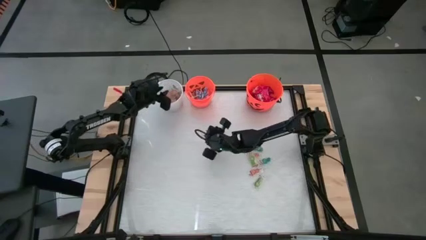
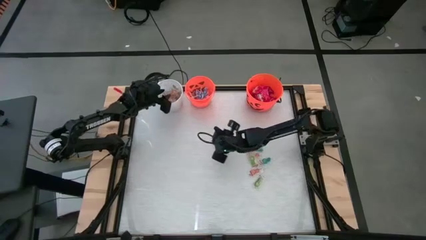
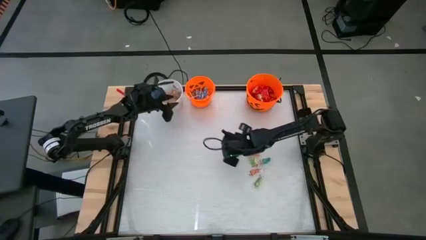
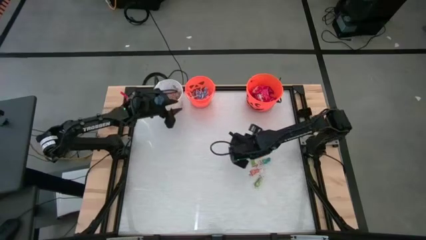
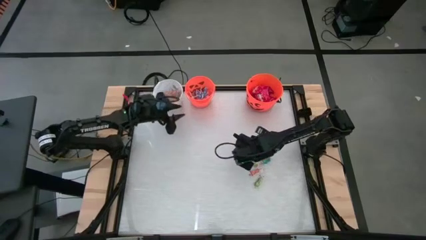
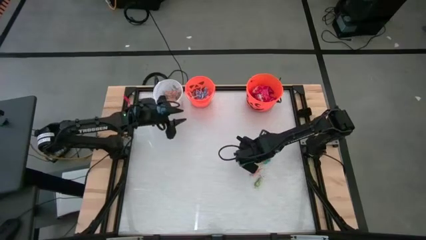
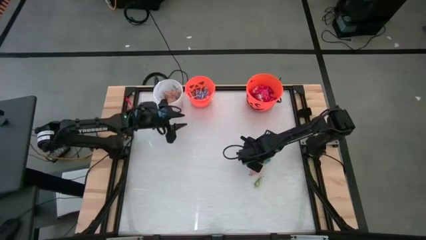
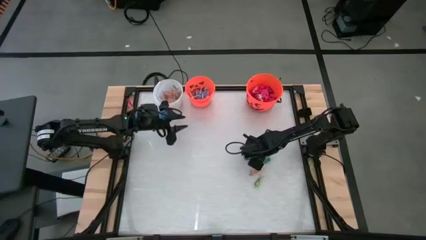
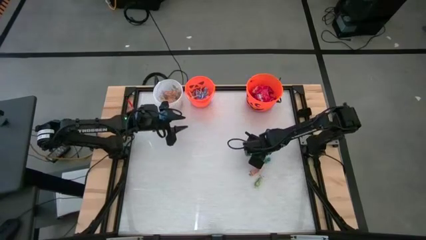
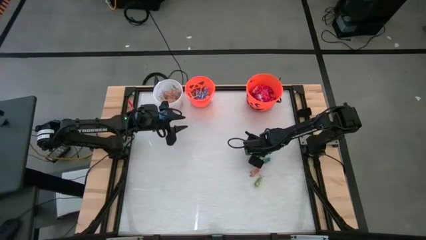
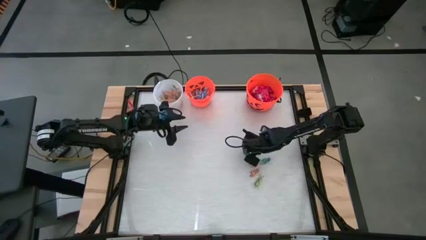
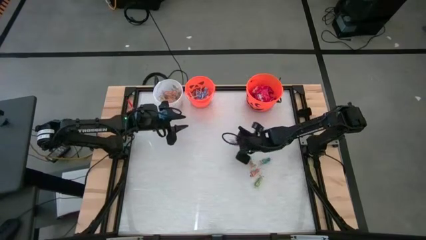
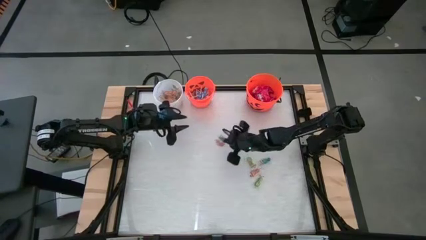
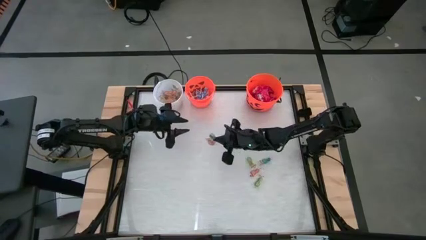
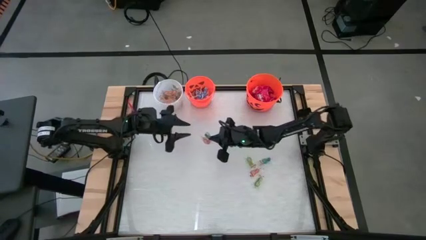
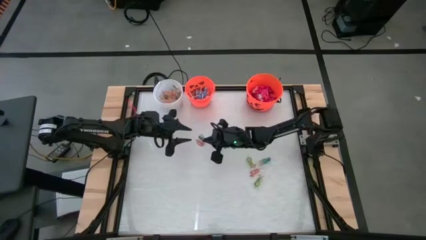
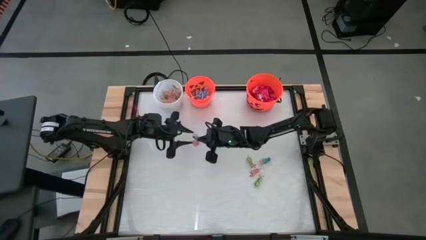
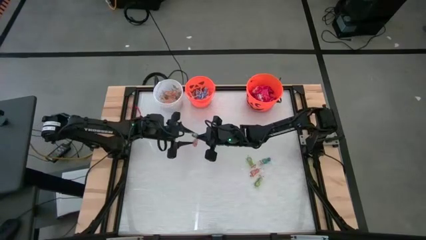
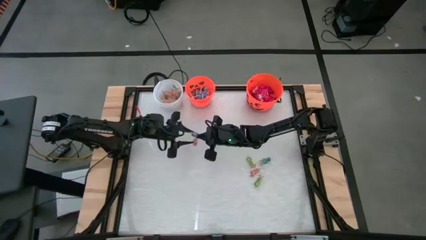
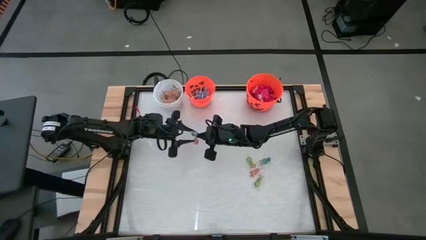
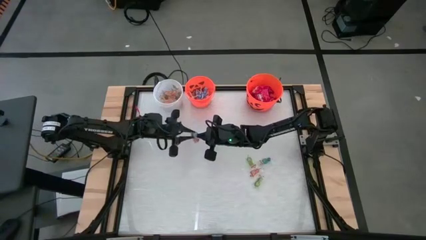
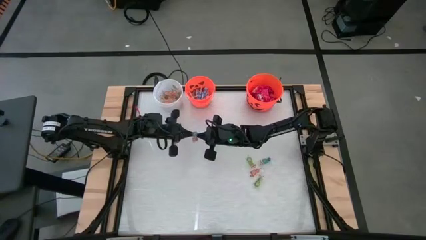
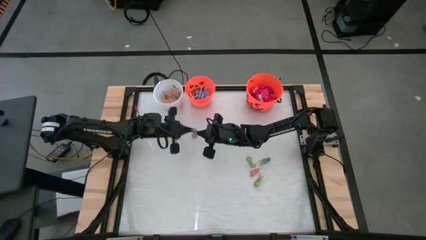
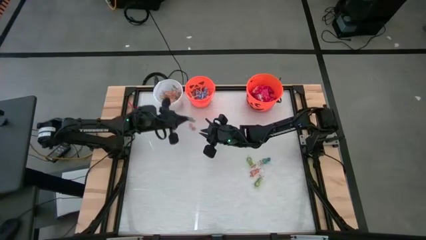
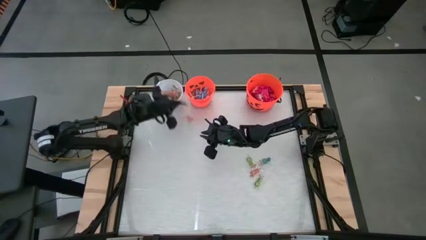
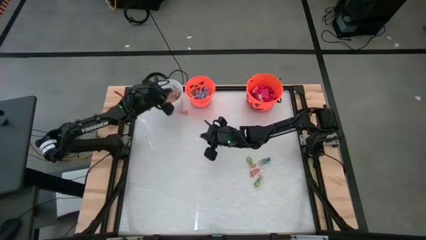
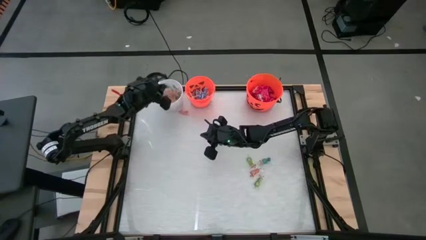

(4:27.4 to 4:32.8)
Task: Sort candy by brand, put in halloween buckets
Put the blue gummy into the white bucket

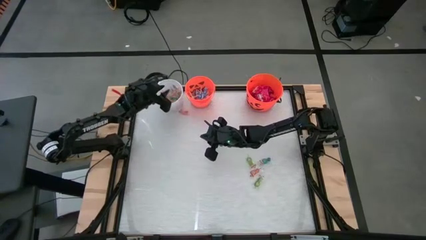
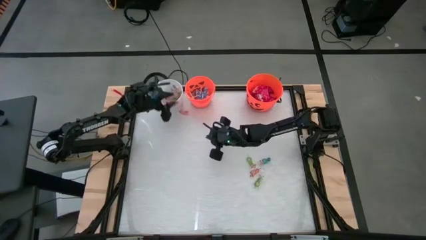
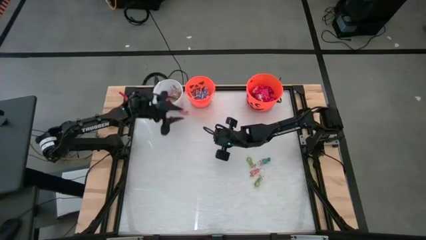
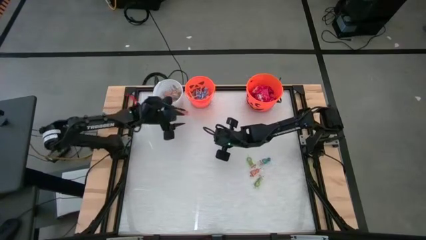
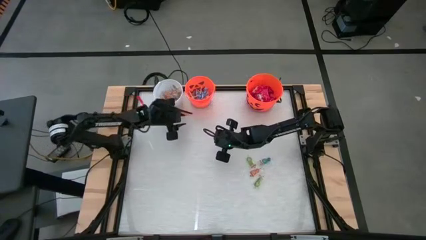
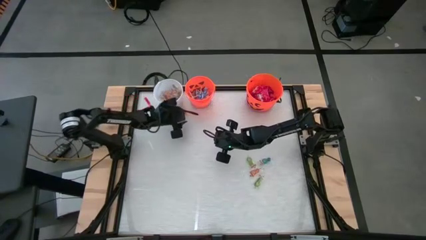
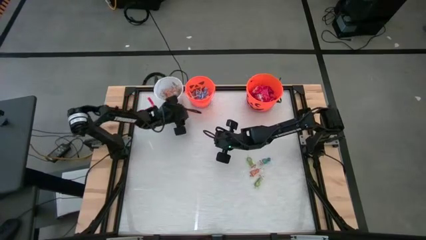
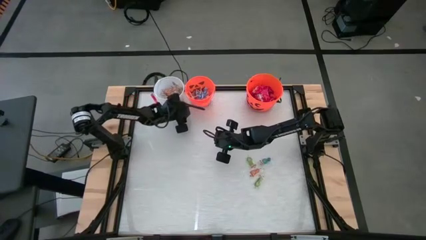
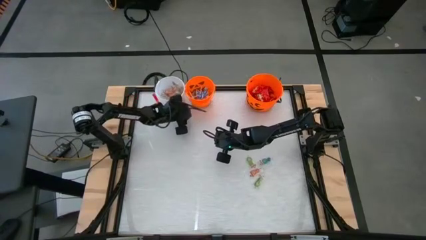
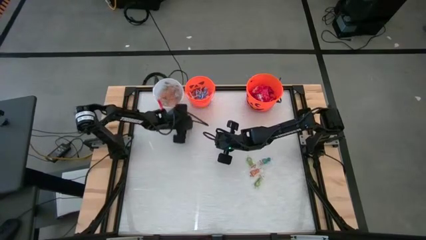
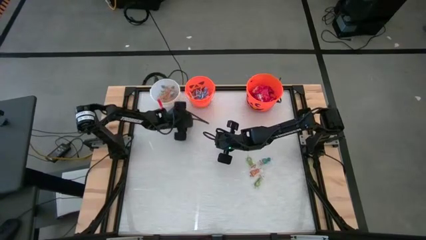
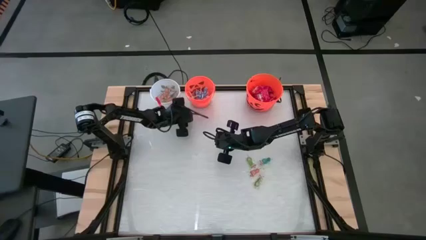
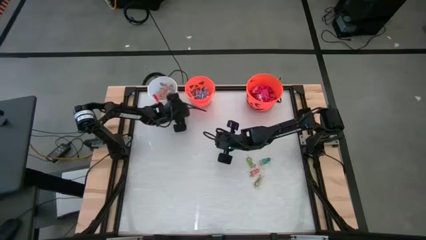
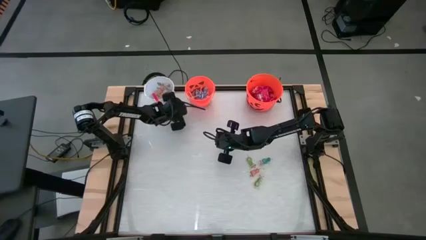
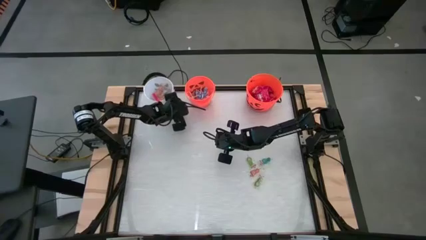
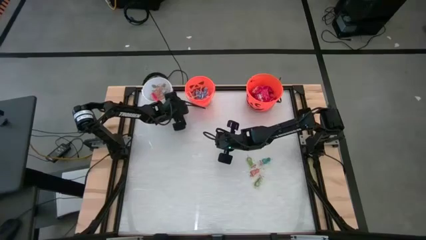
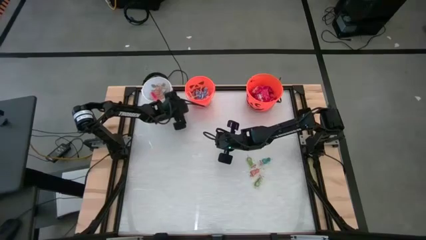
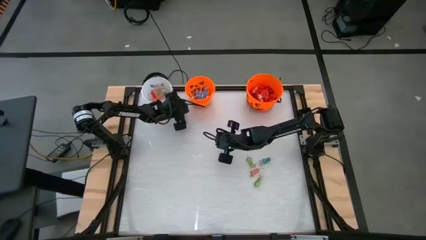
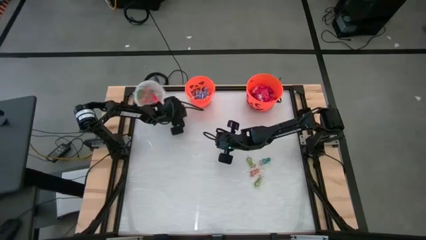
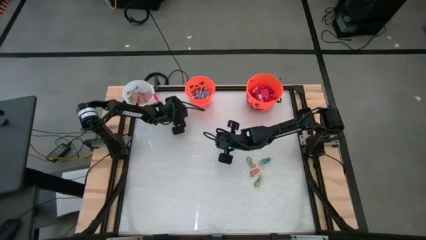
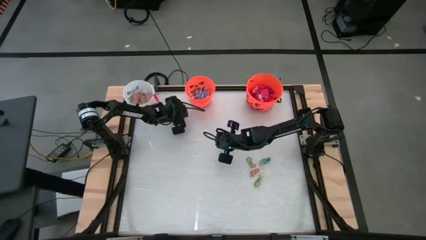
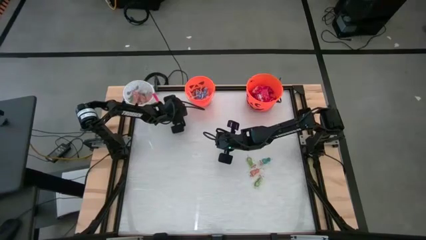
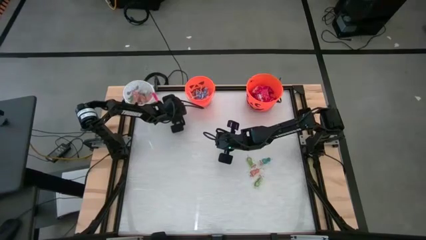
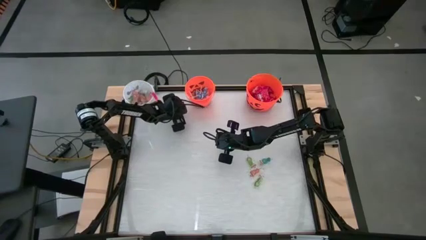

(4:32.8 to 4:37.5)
Put the orange gummy into the white bucket

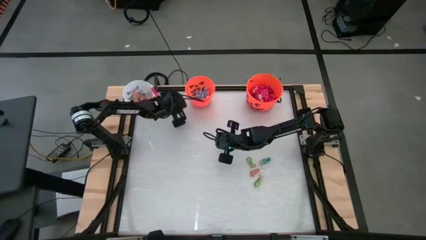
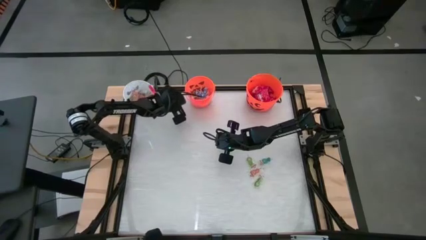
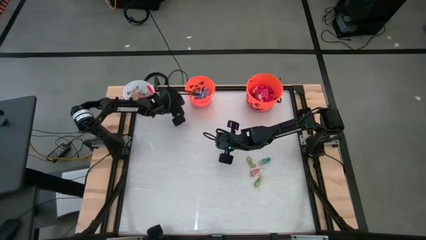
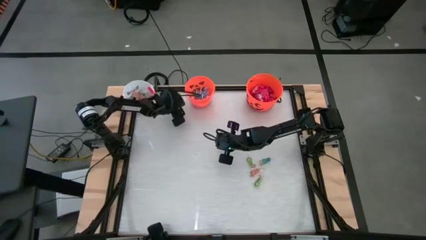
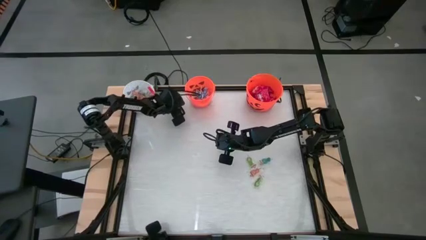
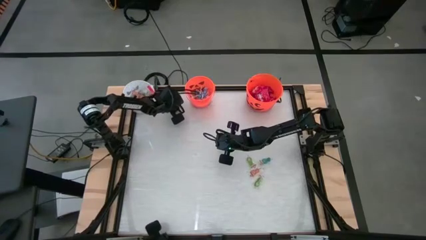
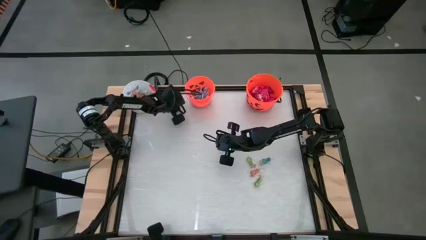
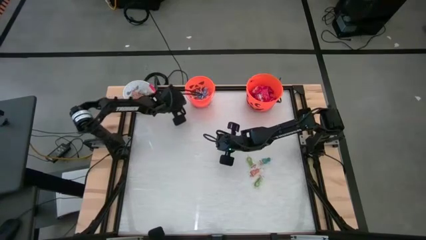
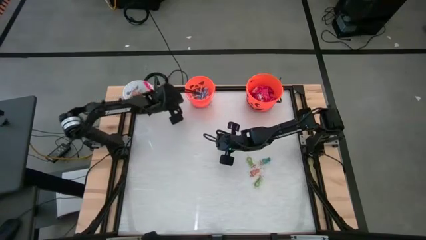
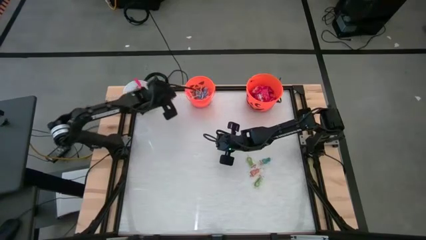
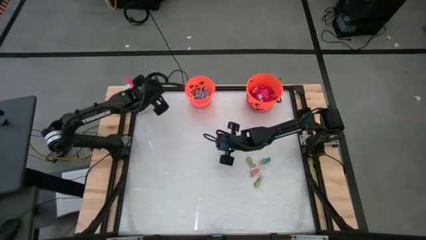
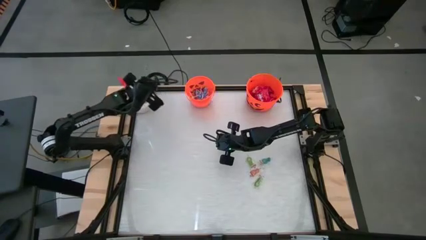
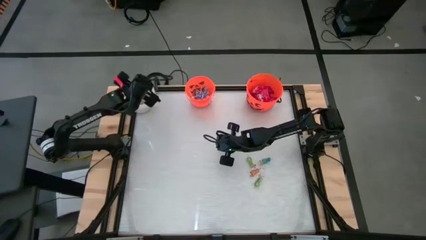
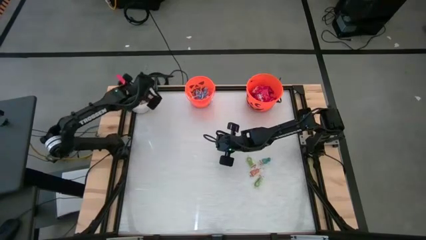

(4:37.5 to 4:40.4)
Put the orange gummy into the white bucket

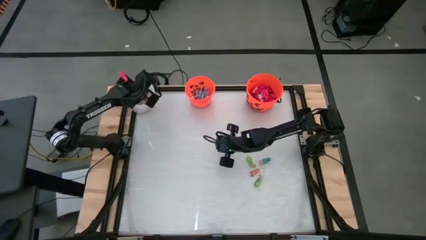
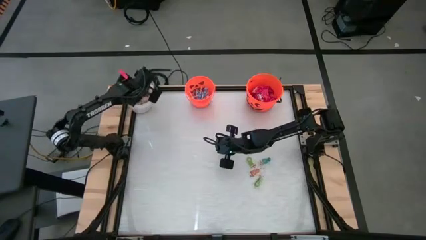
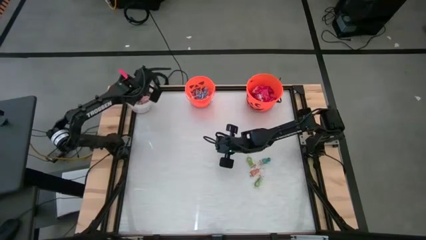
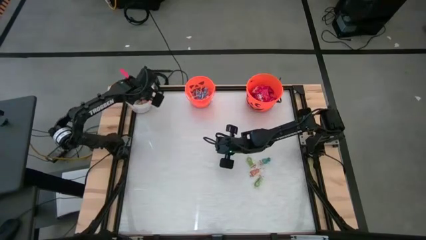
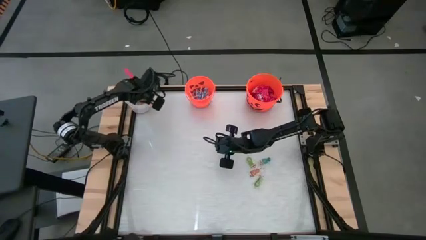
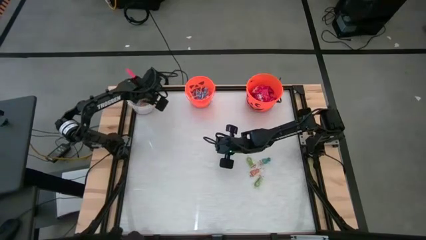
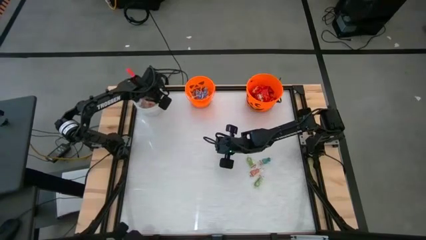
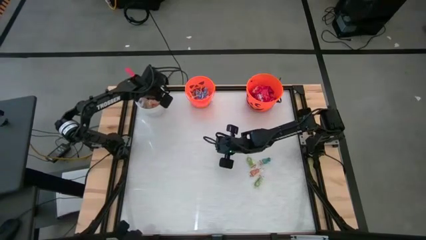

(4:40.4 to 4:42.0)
Adjust the white bucket on the table

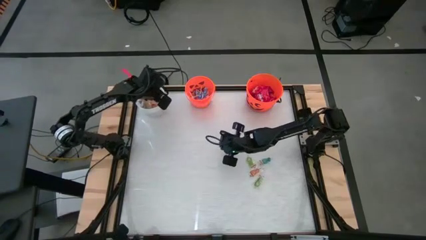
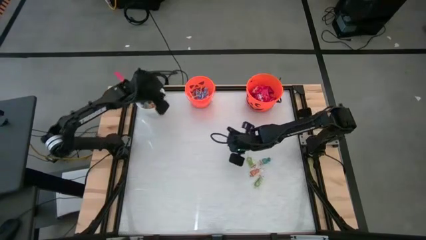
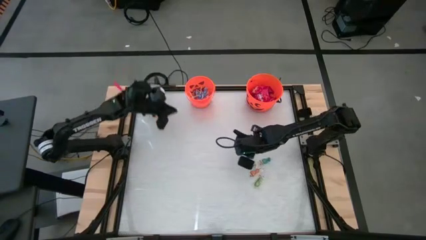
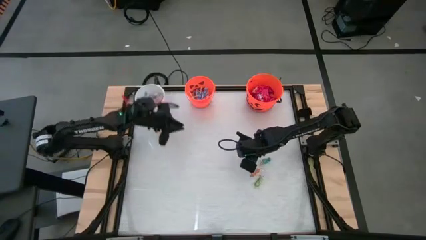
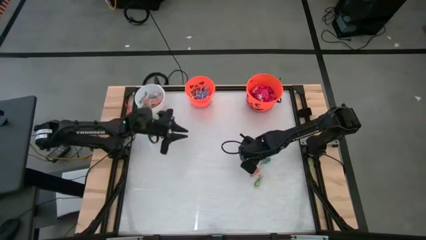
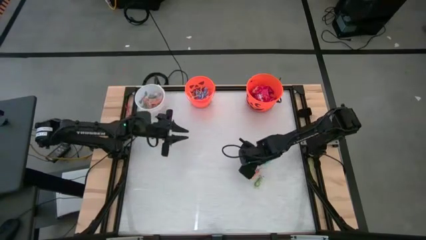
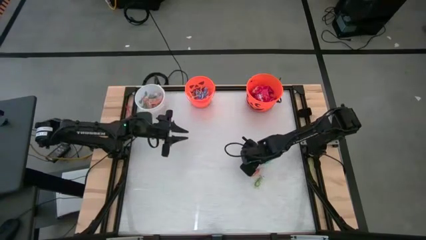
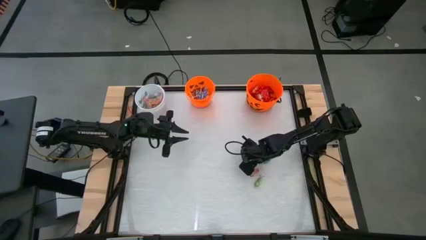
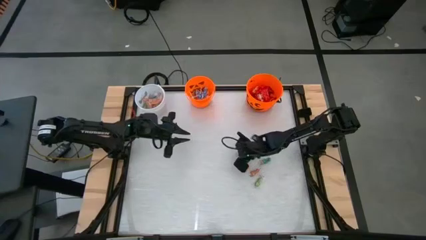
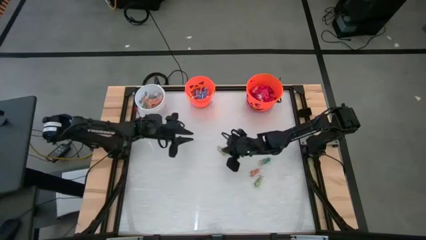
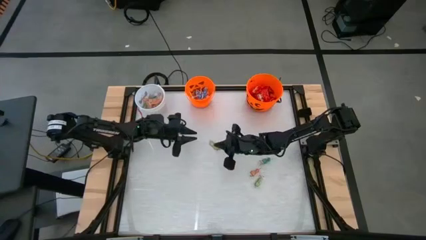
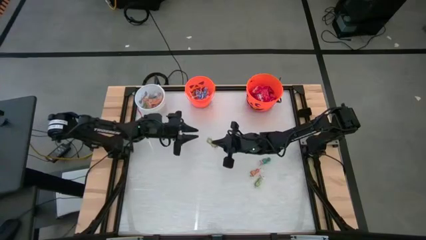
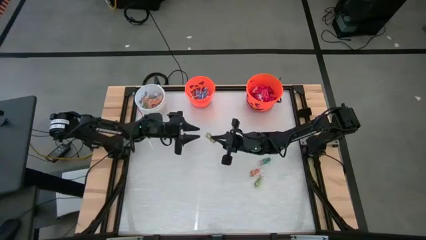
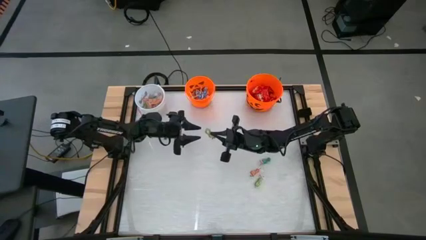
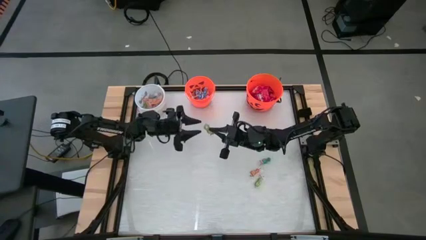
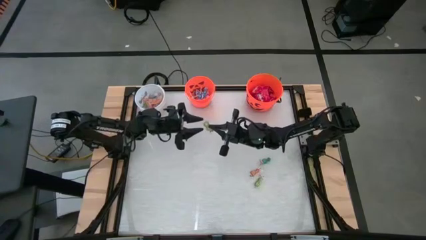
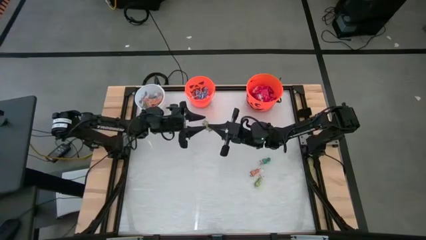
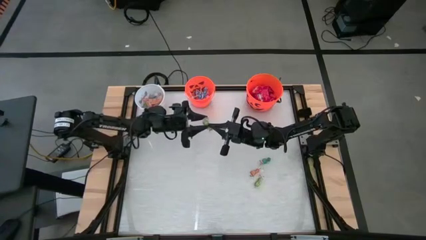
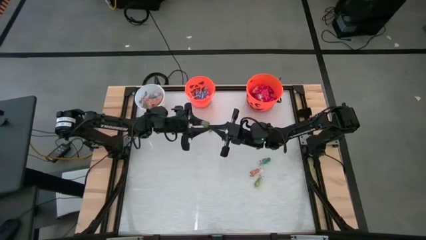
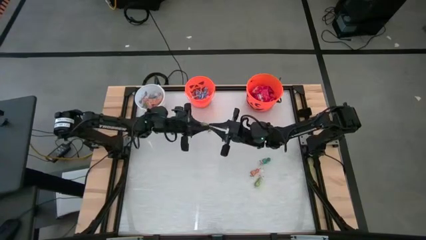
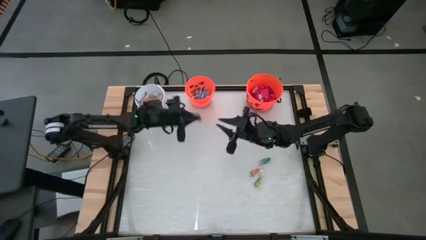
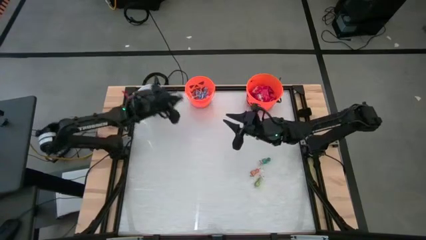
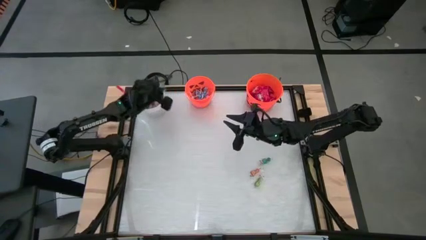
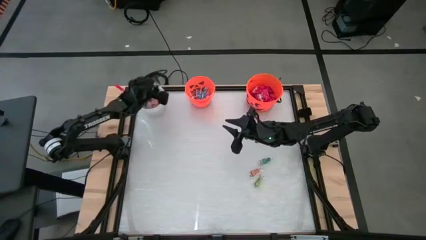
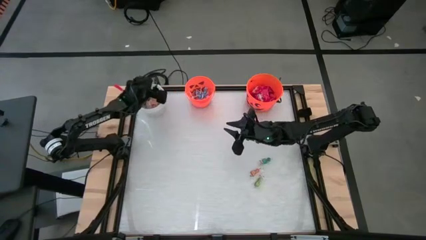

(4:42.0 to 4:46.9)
Put the green gummy into the white bucket
